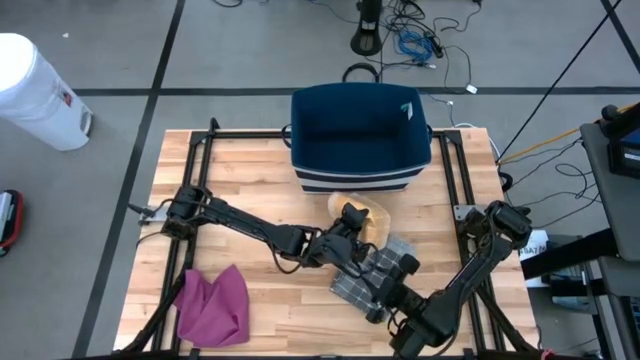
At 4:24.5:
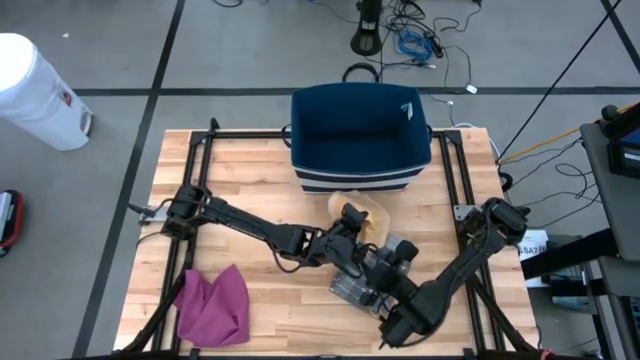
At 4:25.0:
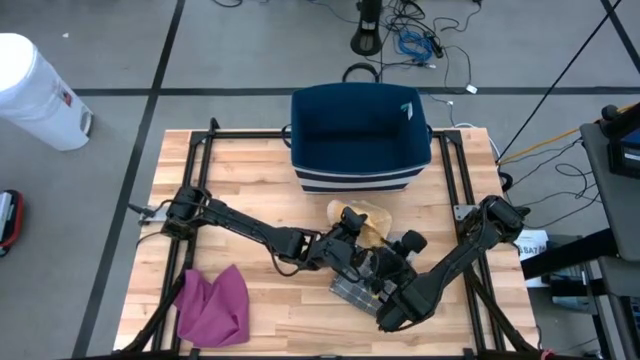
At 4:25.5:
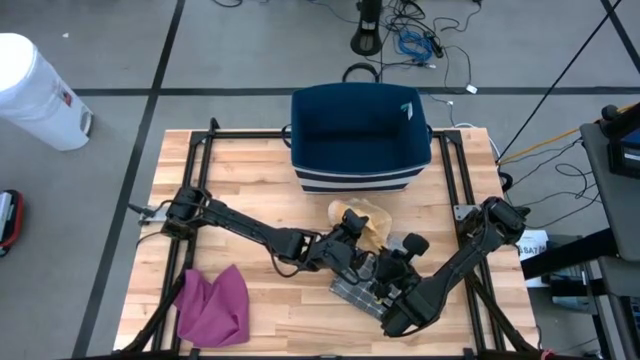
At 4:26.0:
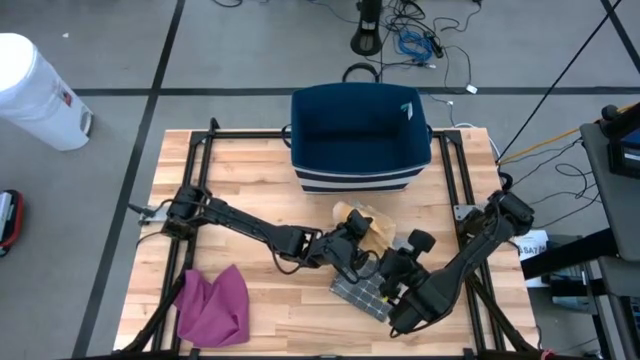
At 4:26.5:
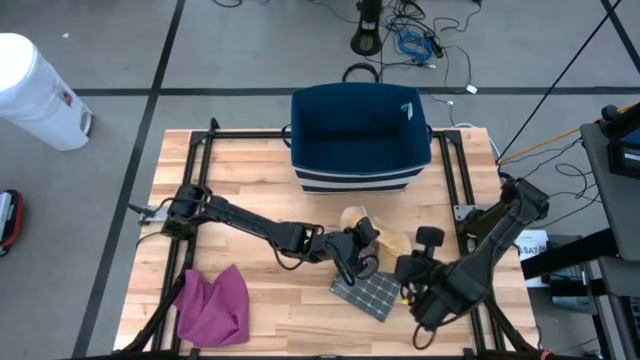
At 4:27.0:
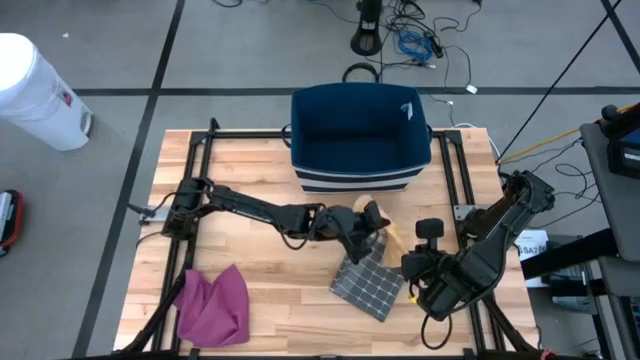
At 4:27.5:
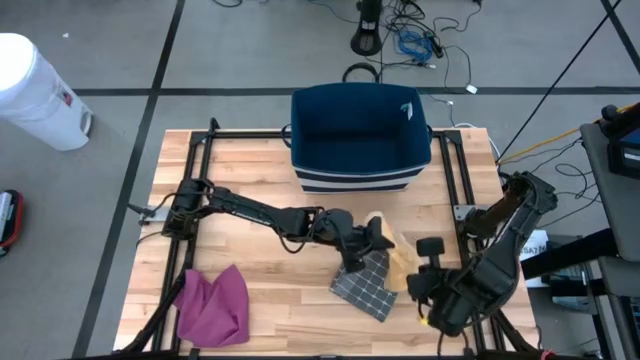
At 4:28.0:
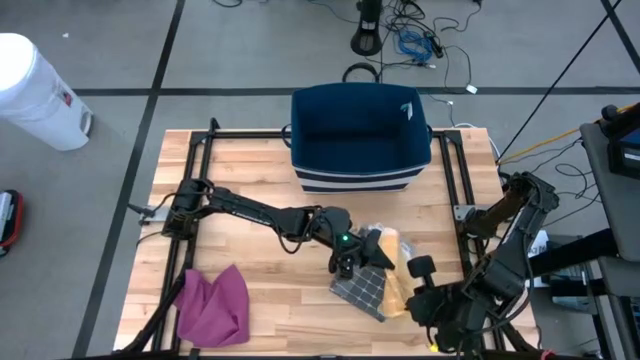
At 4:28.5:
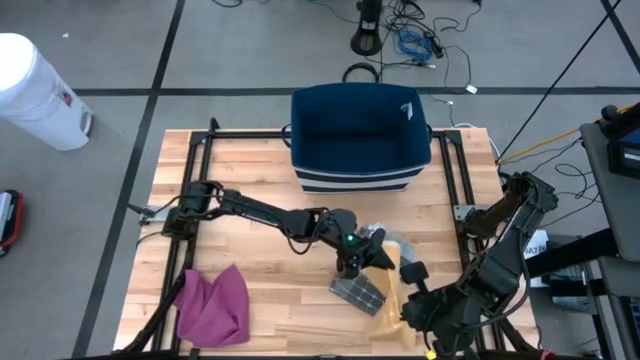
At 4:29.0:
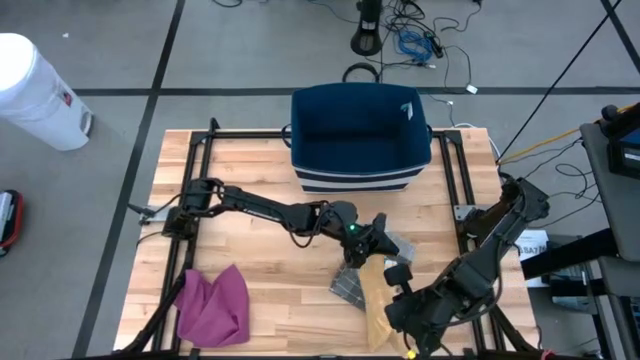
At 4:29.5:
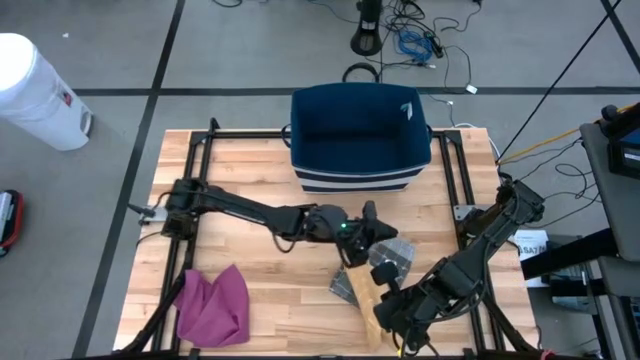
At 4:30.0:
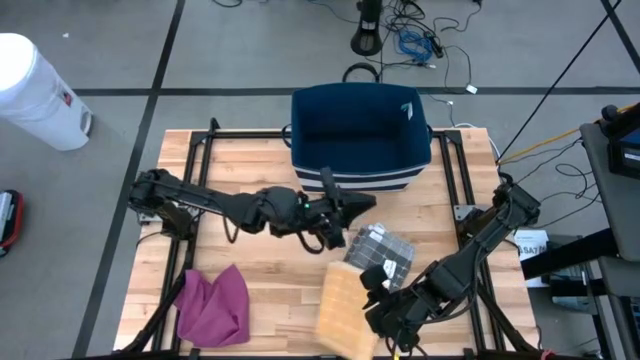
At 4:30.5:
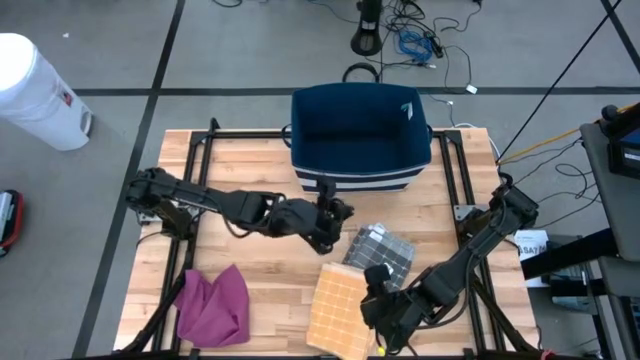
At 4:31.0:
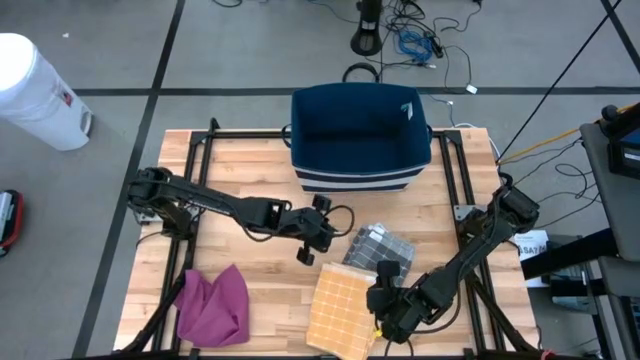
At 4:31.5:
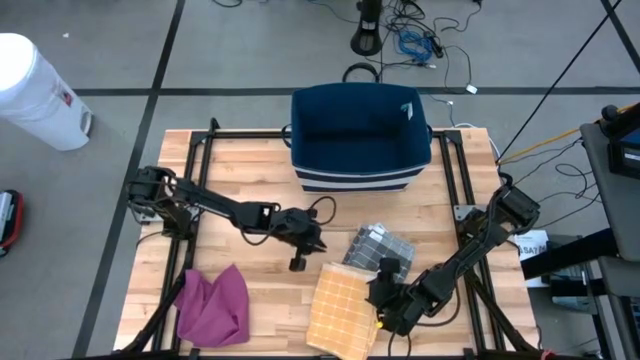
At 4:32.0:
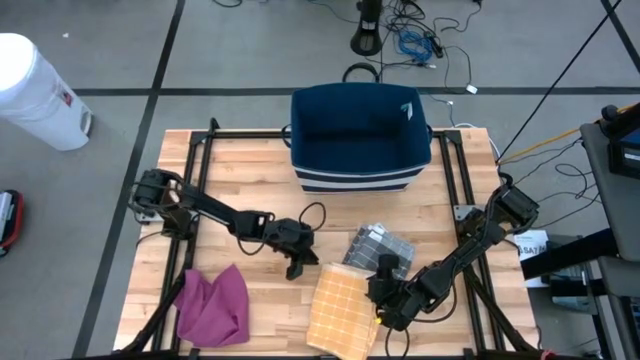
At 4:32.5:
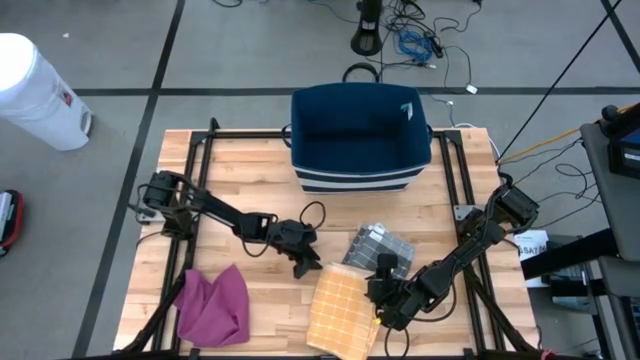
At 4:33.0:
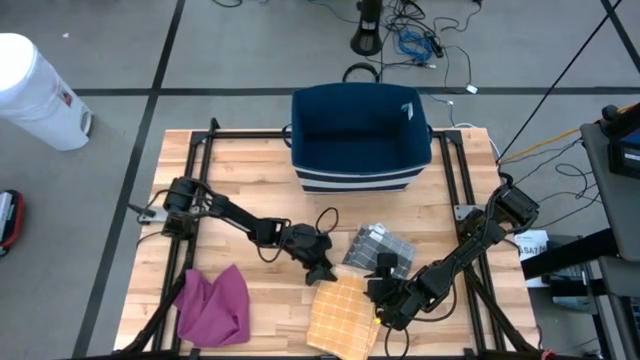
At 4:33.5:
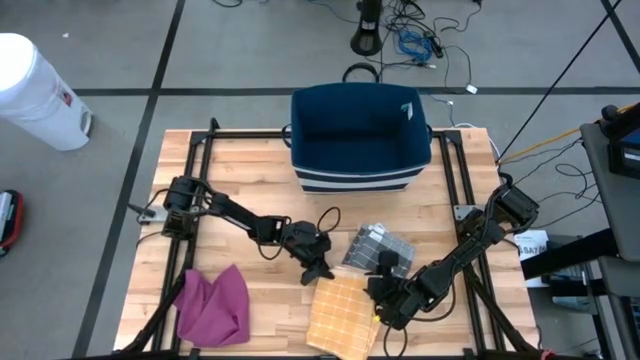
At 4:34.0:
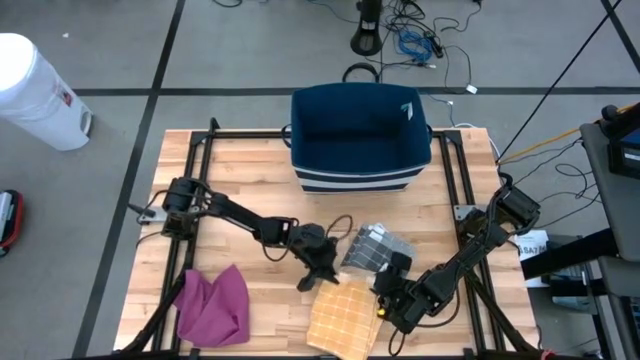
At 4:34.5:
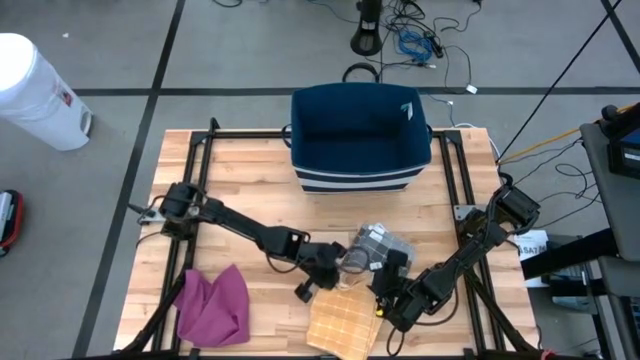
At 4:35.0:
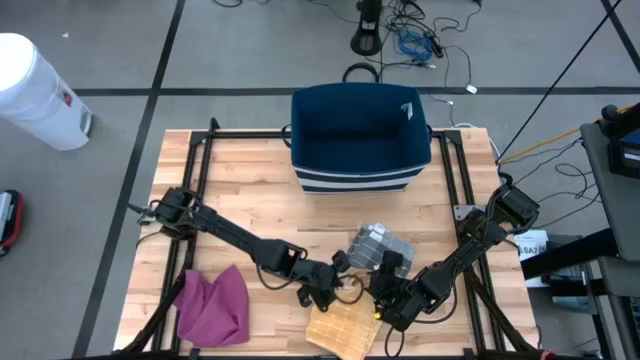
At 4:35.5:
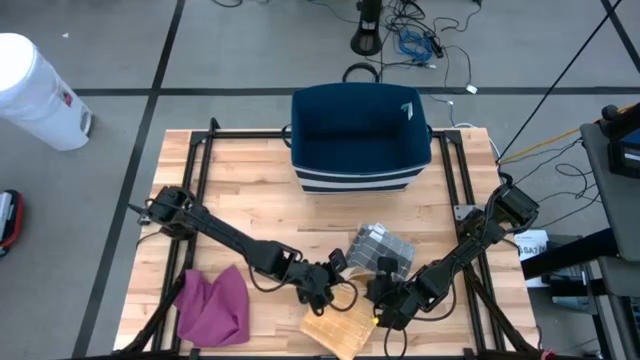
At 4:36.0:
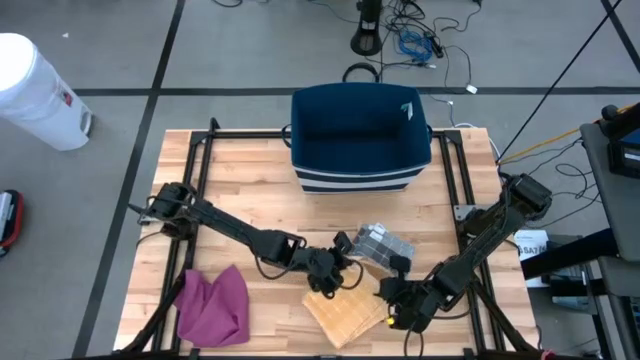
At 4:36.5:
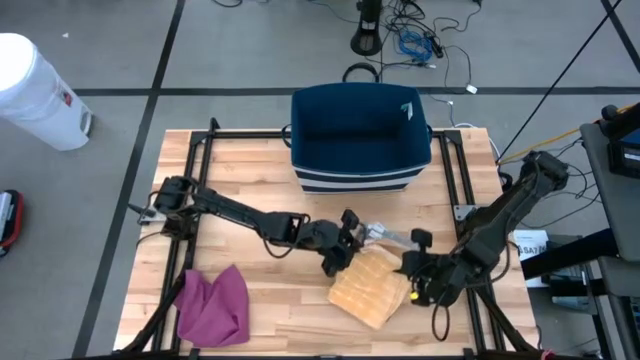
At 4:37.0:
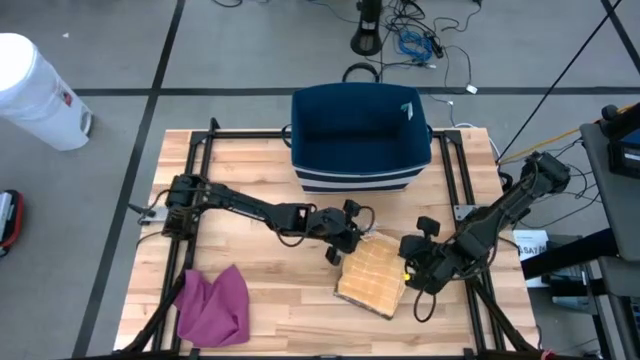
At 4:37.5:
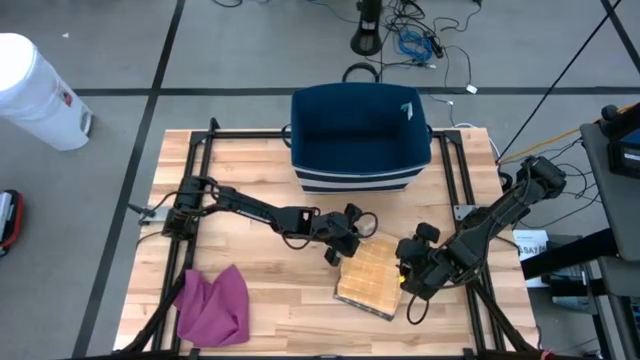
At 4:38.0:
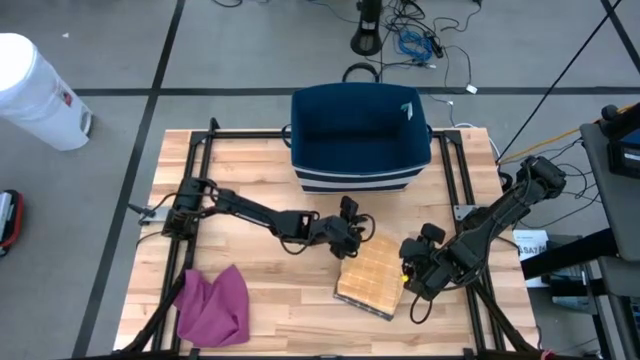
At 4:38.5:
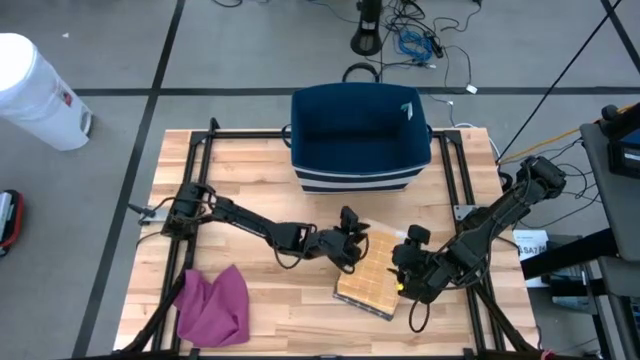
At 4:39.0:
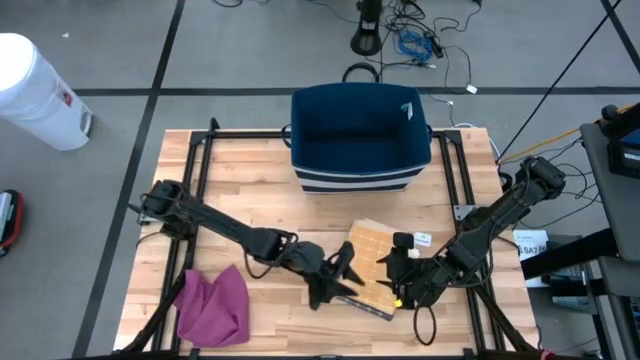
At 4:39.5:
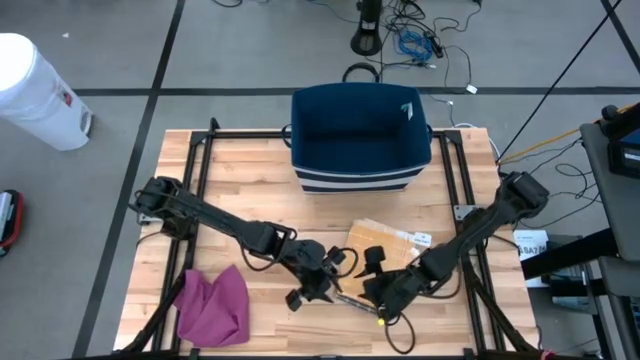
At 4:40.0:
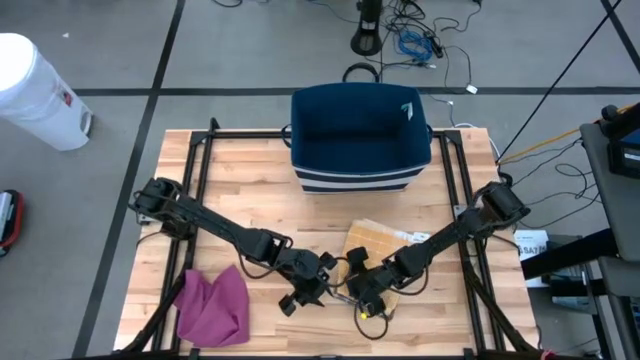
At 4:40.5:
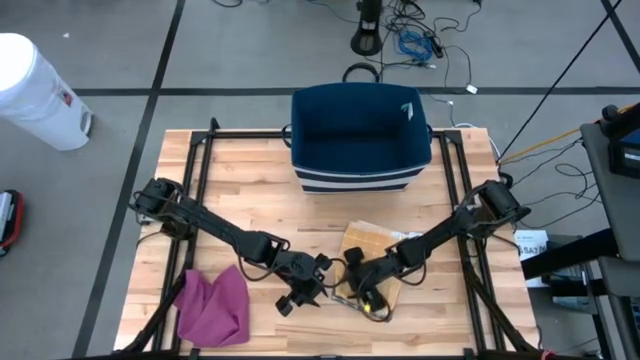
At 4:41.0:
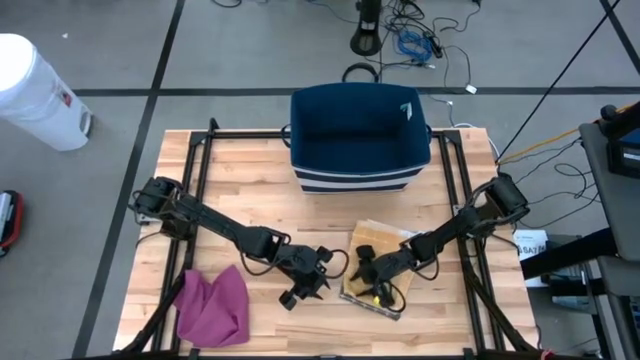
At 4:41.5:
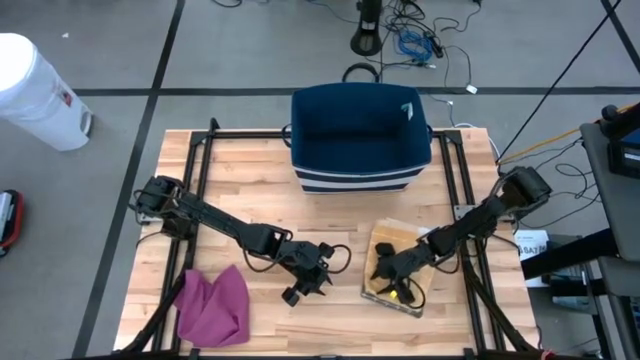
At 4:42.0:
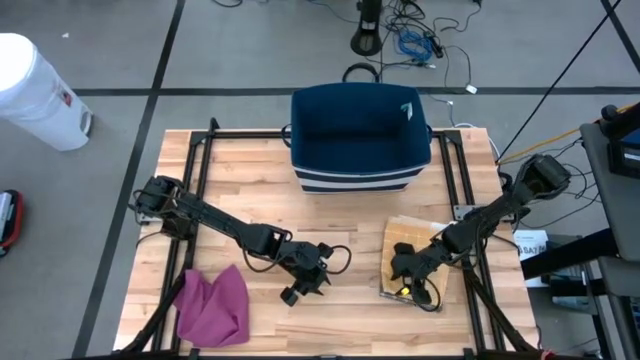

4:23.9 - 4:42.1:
Task: Fold towel
Stack the orange patterned towel on the gray patterned towel

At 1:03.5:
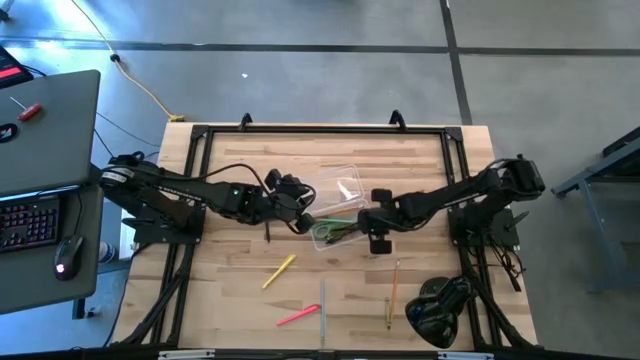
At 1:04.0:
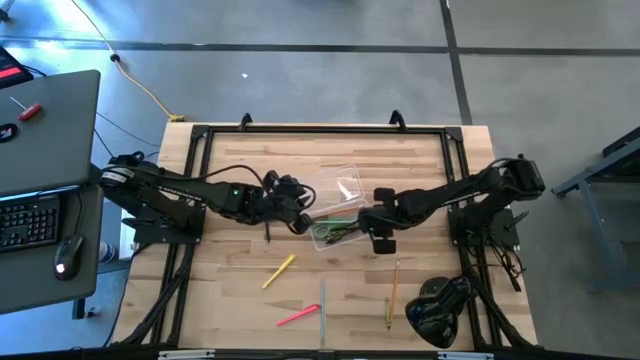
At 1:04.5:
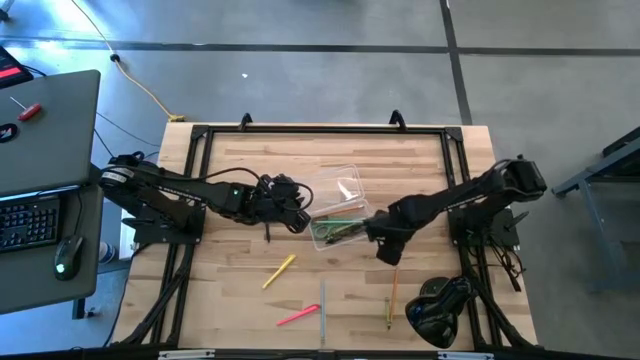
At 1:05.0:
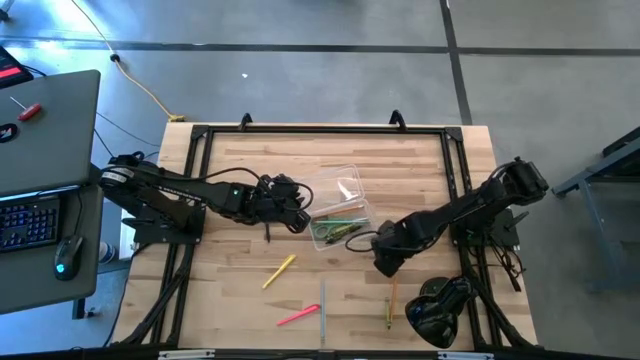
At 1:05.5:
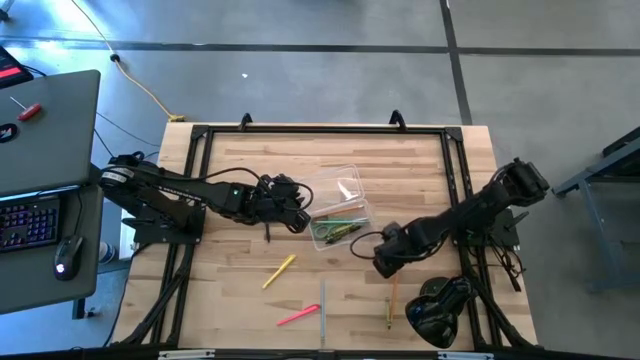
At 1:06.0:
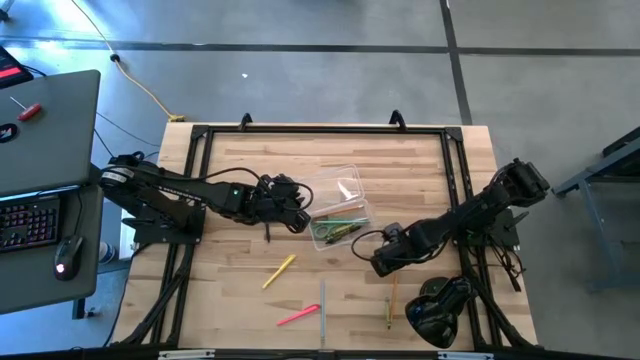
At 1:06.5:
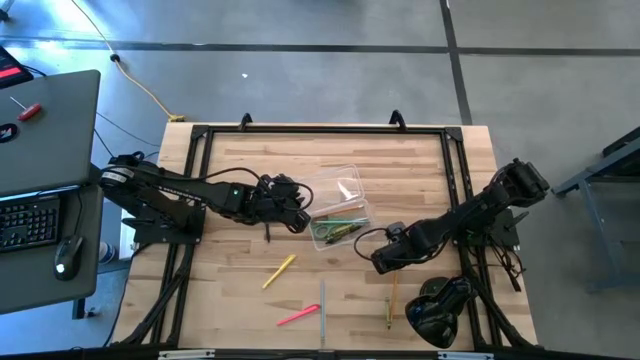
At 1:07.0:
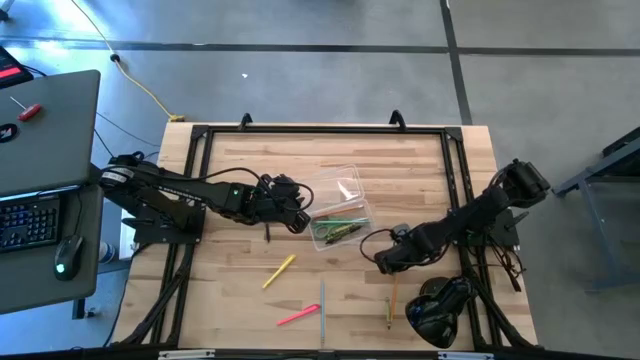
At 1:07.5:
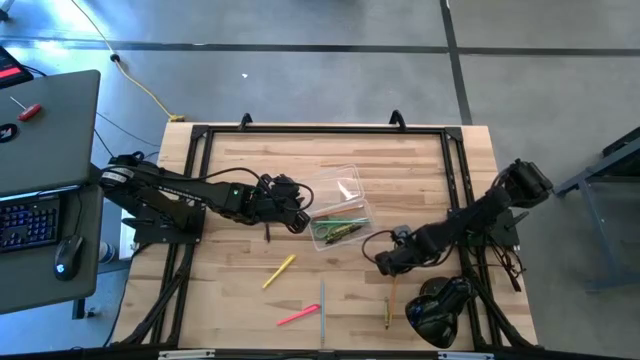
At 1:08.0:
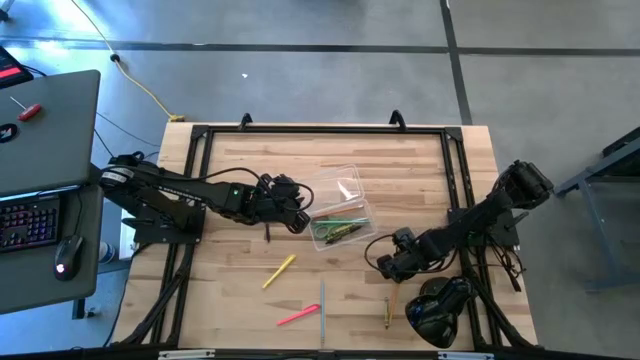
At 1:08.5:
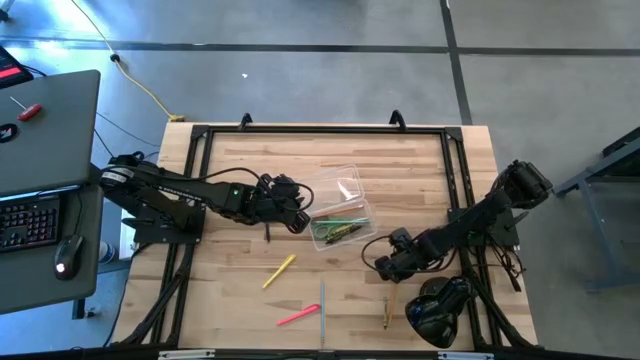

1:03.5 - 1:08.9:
Task: Pick & place school supplies into a supply box
Put the orange pencil into the supply box
